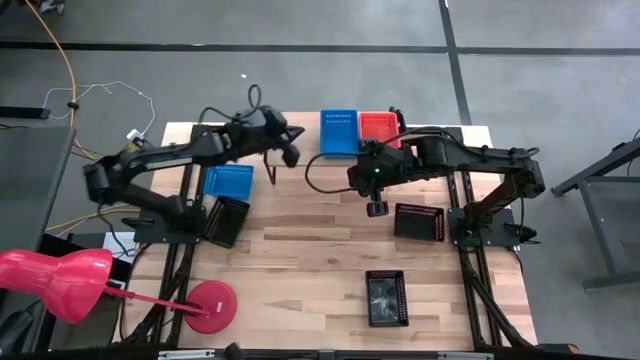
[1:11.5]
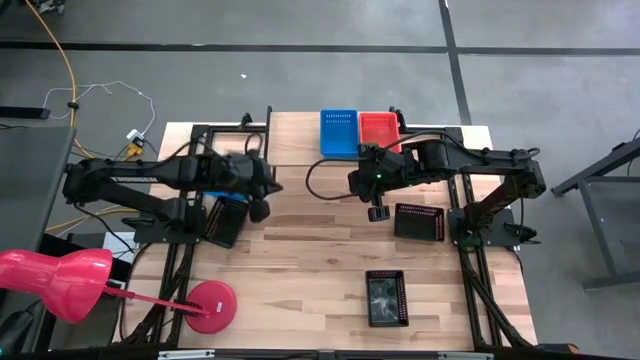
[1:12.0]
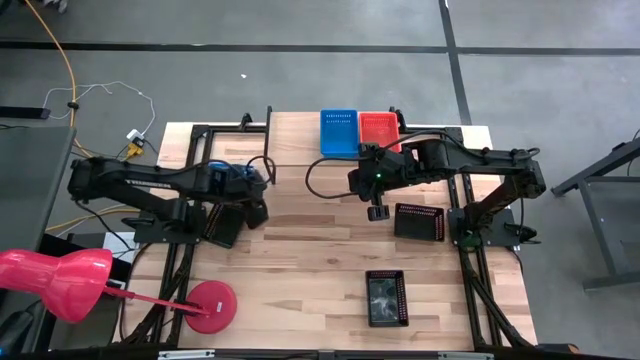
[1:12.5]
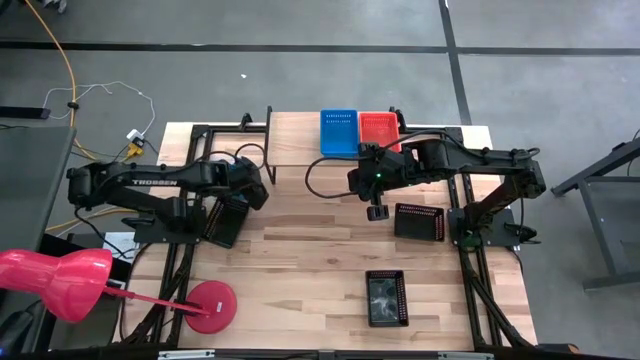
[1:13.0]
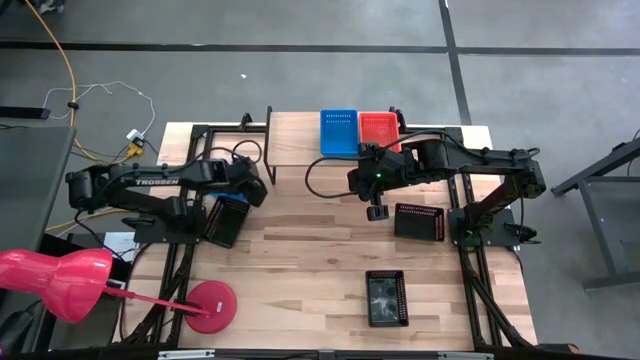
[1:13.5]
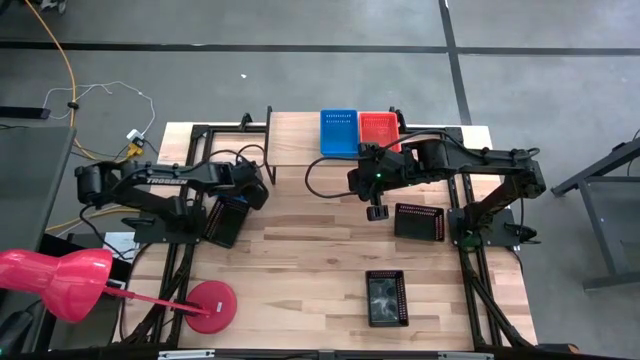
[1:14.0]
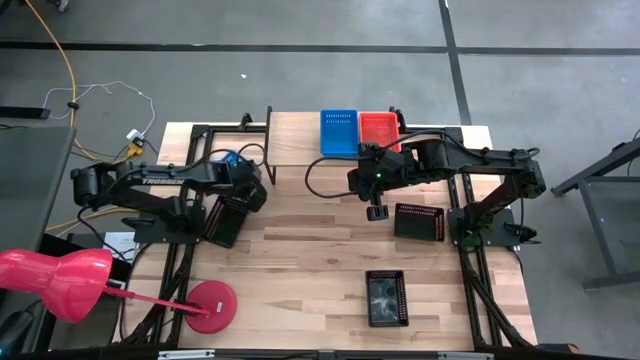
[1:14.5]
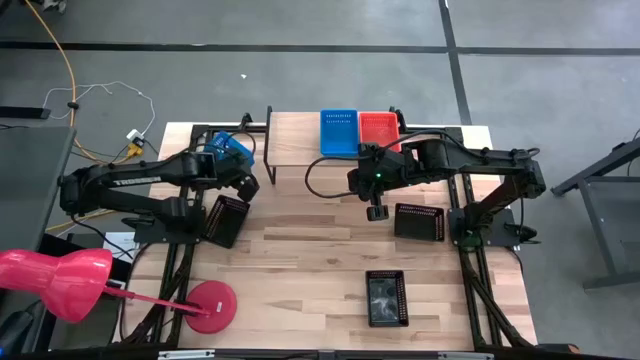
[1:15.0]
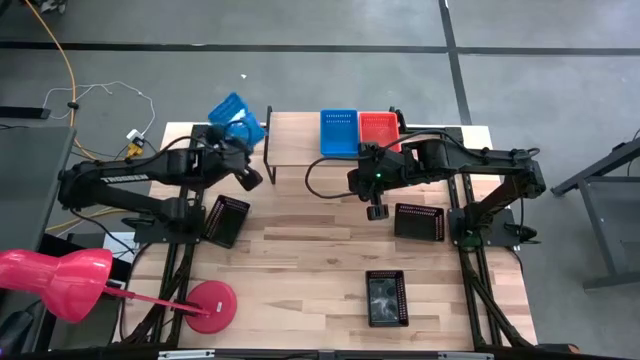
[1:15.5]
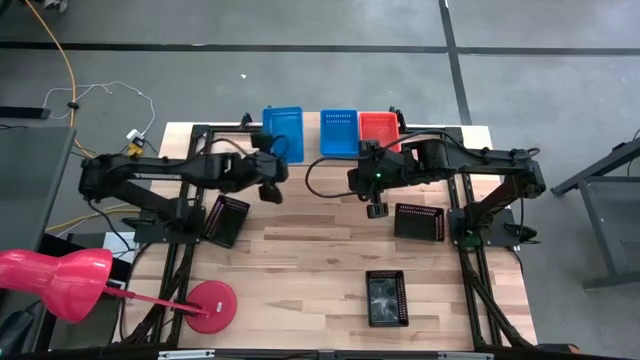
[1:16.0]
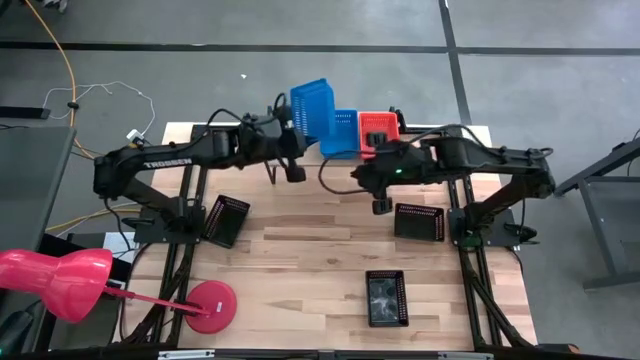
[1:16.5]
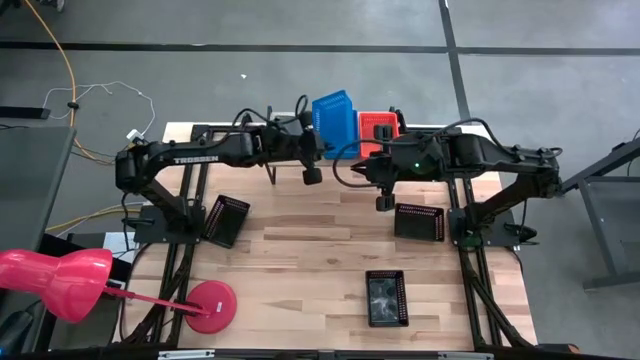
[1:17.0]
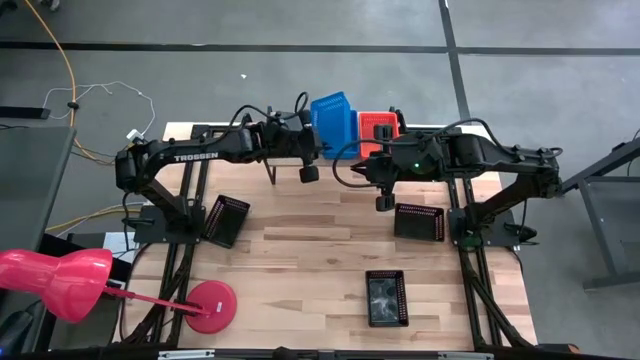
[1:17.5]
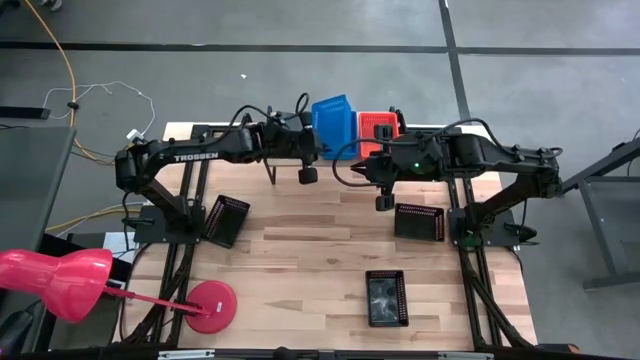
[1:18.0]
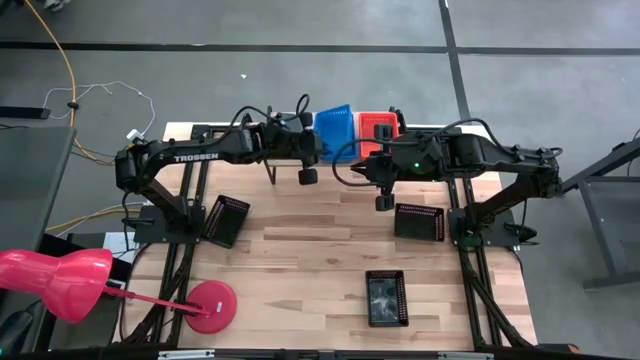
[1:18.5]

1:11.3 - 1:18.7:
Task: Stack baskets on shelf by color
Stack the blue basket on the other blue baskets on the shelf

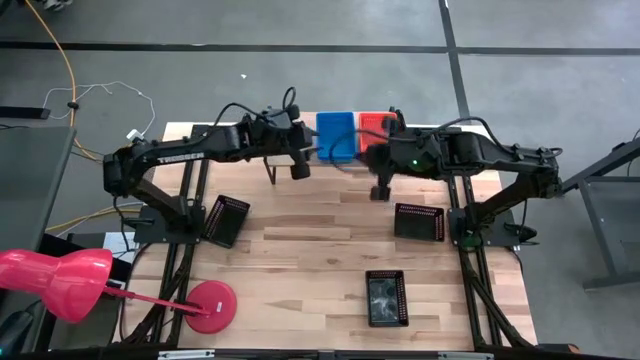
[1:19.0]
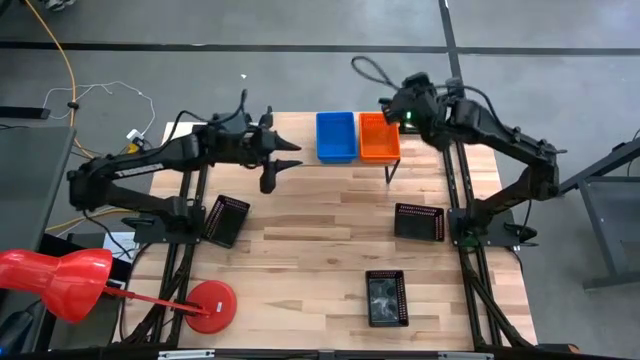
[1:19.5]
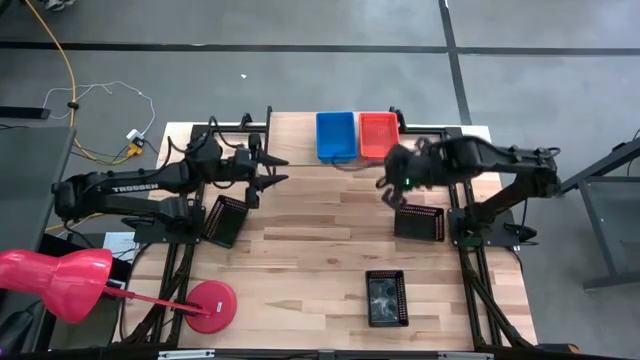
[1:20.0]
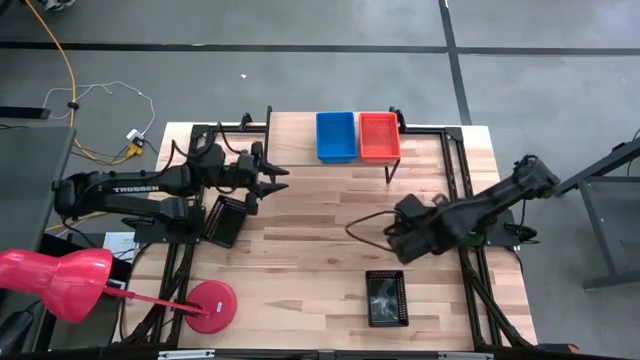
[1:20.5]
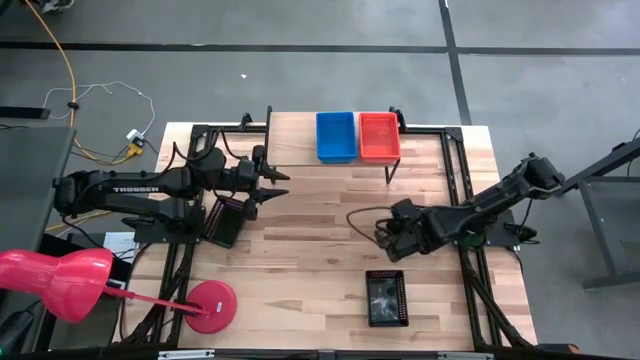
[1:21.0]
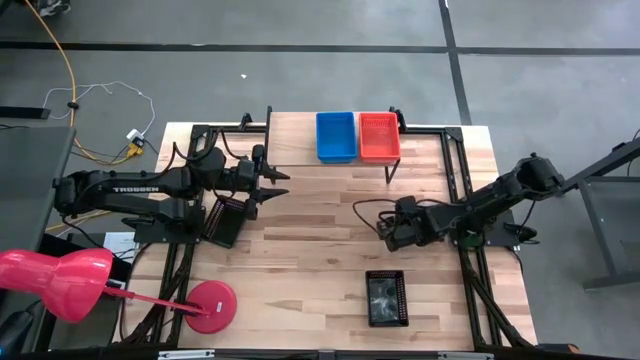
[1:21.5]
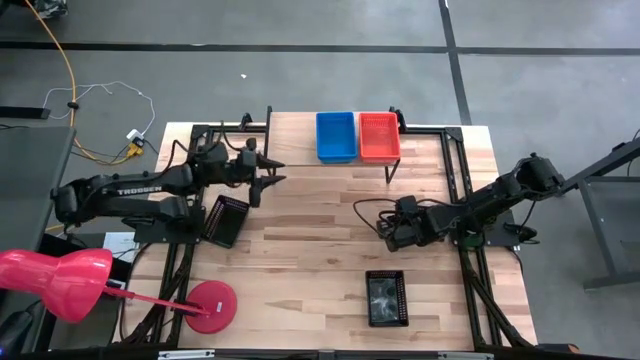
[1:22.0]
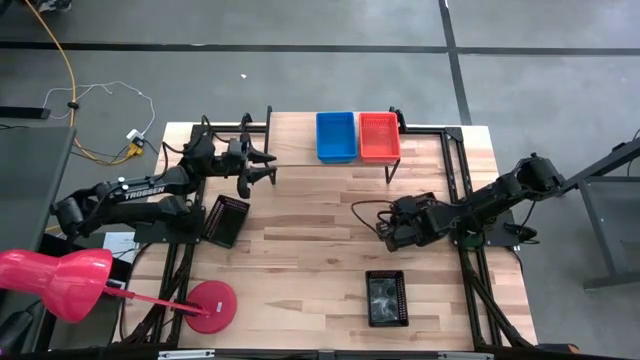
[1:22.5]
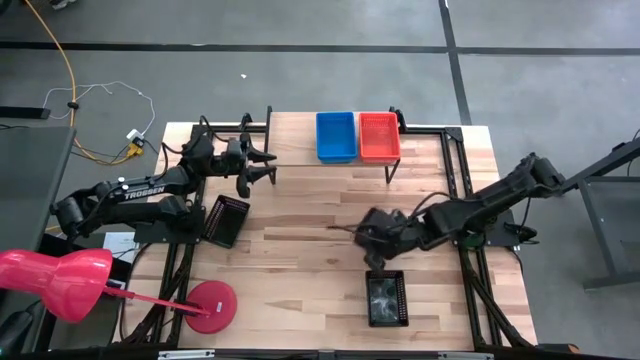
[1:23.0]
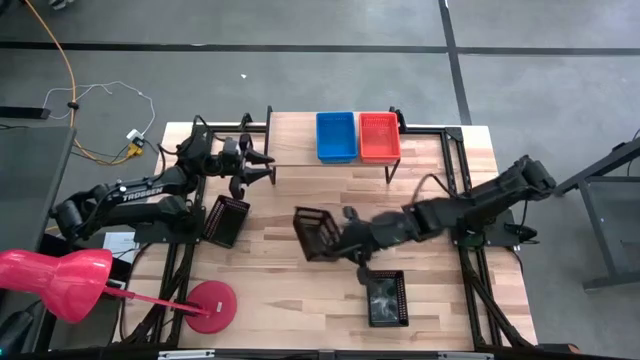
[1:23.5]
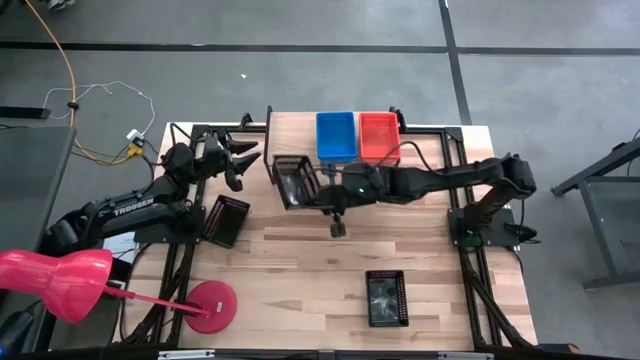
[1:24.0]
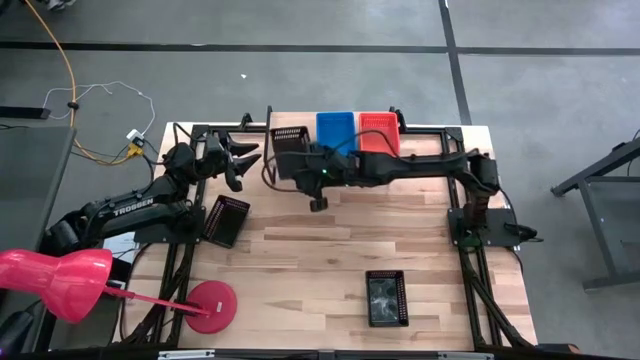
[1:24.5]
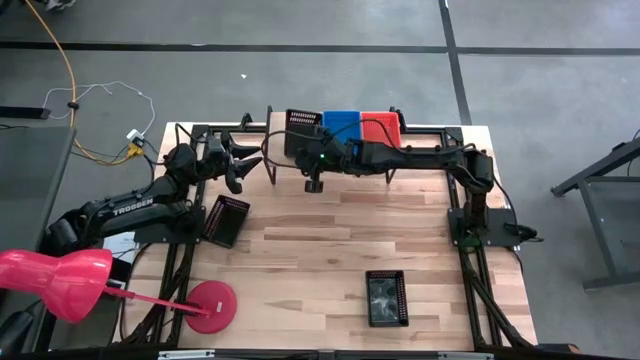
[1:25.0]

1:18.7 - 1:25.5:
Put the top right black basket on the shelf

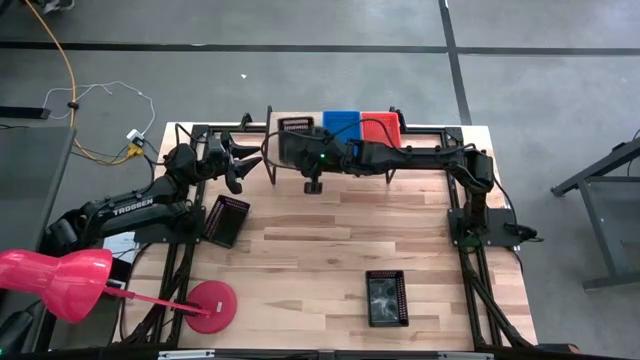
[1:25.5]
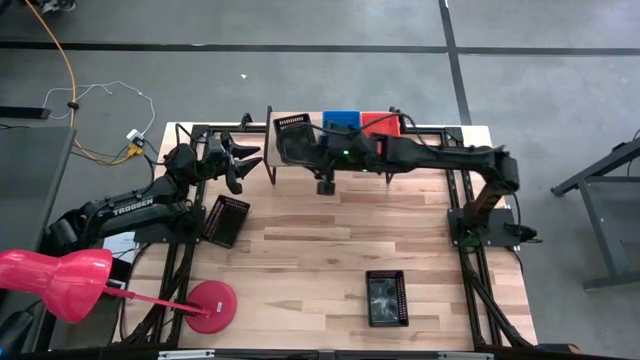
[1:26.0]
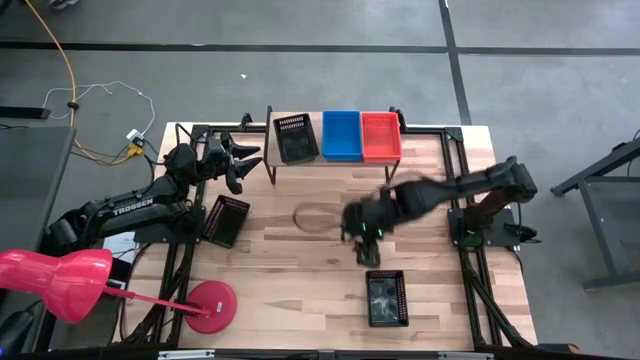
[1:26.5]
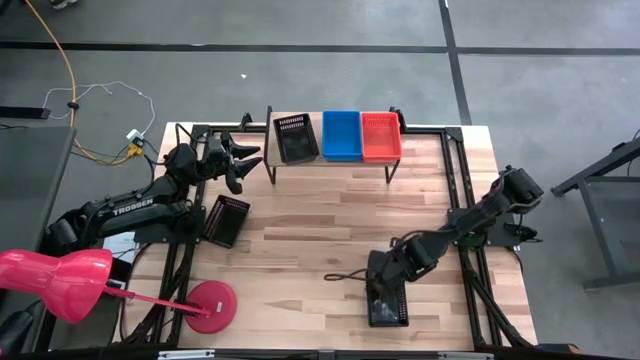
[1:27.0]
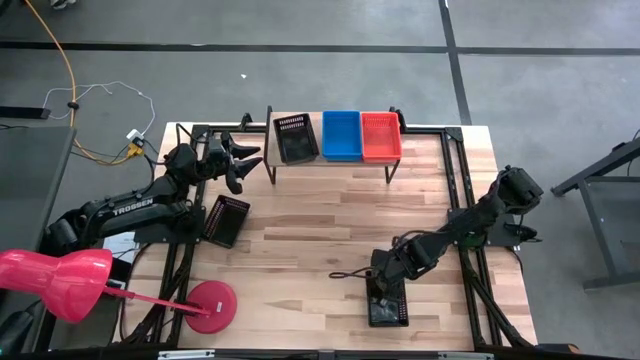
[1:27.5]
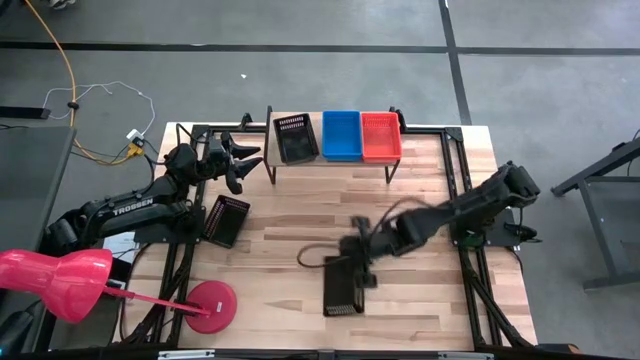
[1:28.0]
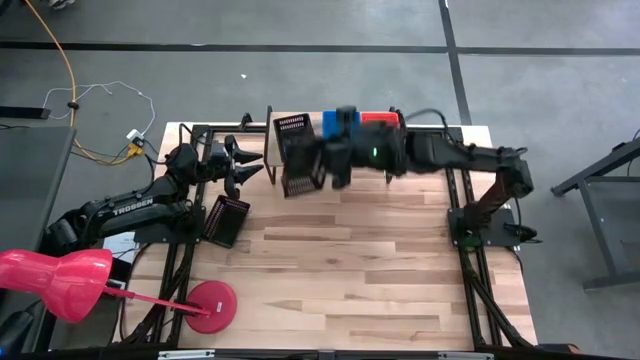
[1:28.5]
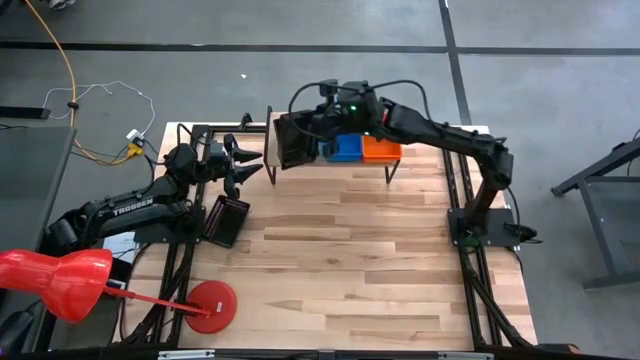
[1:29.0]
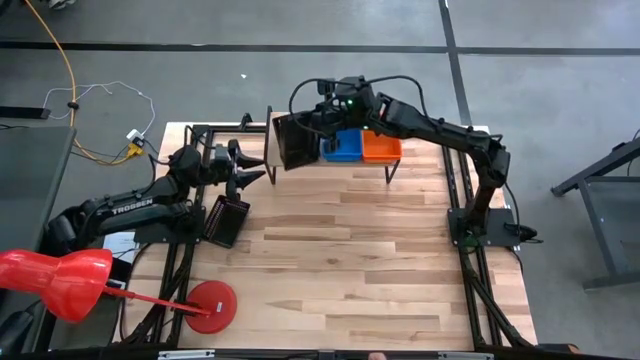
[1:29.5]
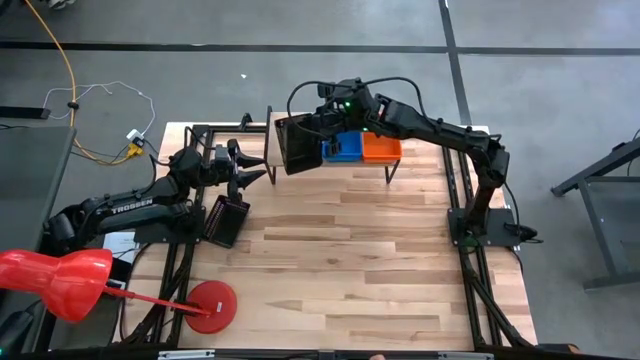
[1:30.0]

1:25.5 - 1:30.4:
Stack the right black basket on the other black basket on the shelf

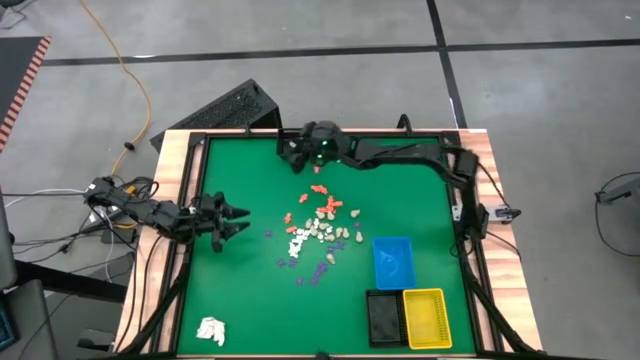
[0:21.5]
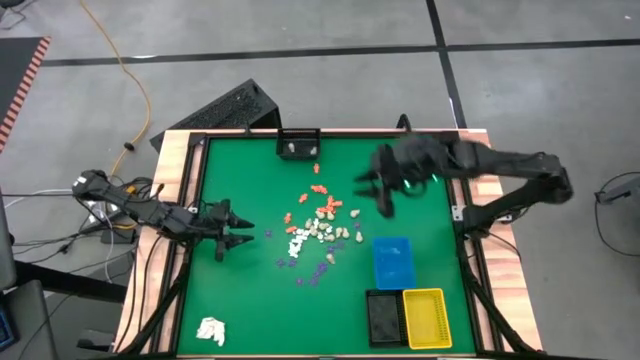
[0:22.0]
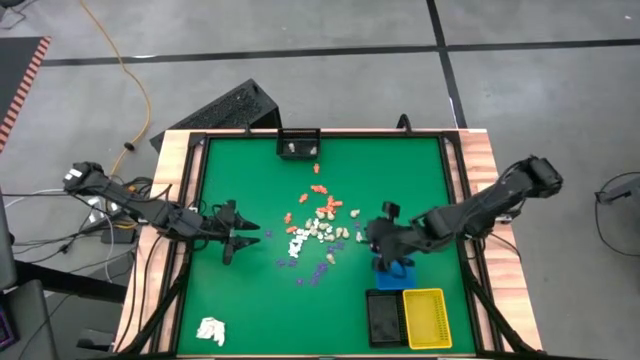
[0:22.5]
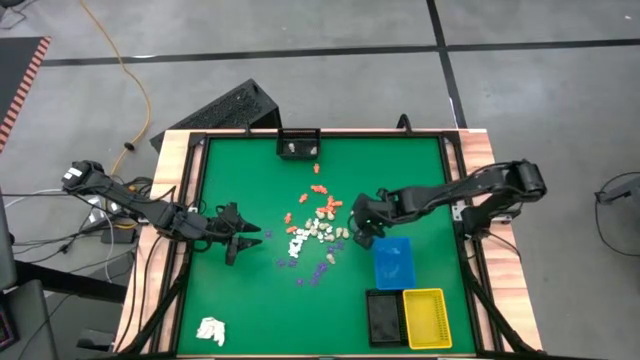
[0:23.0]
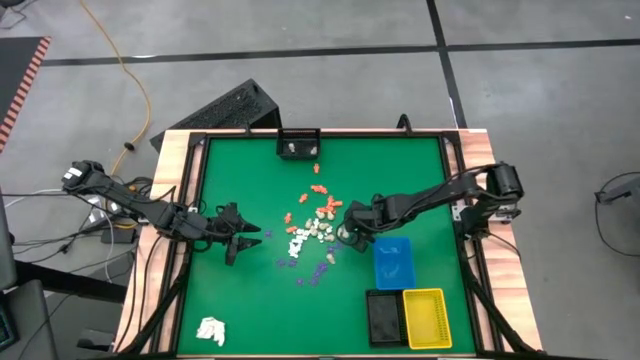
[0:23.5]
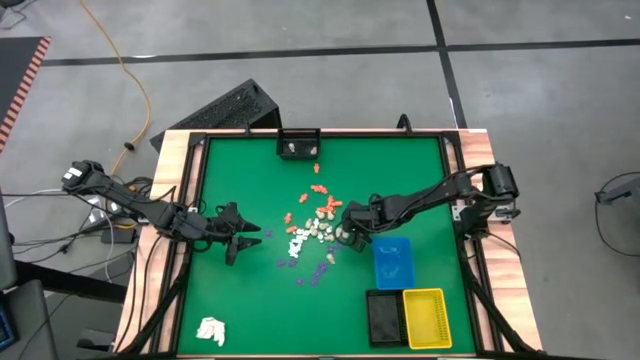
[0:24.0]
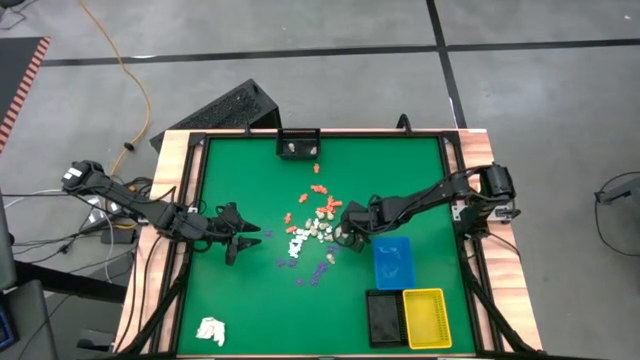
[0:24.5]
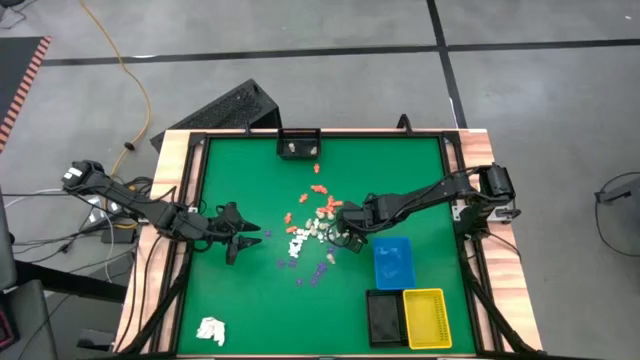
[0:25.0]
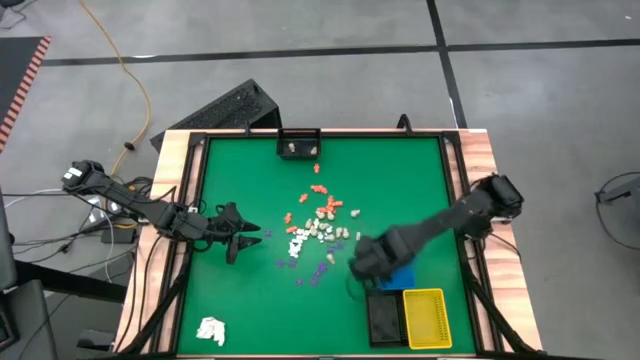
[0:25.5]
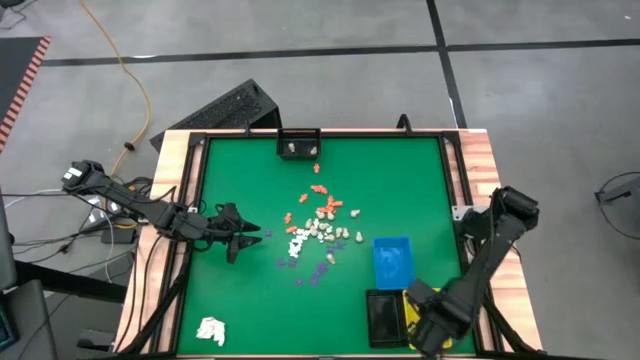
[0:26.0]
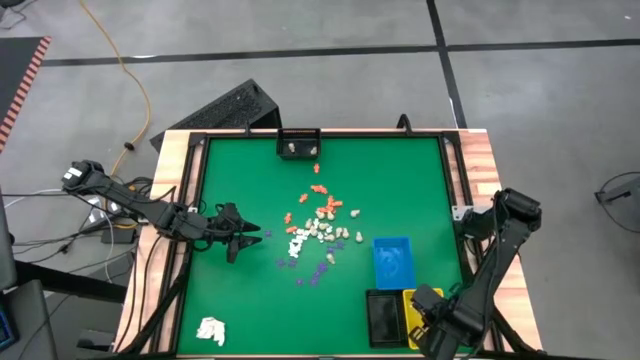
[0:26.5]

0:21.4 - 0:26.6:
Task: Sort Halloween decoration
Put the purple spider toy into the yellow bin
